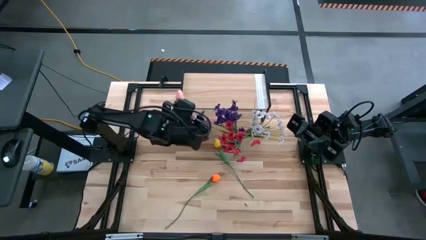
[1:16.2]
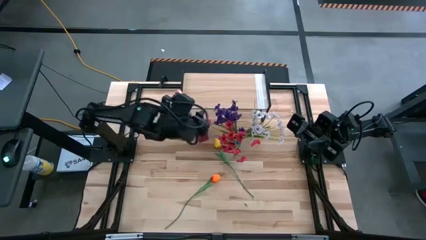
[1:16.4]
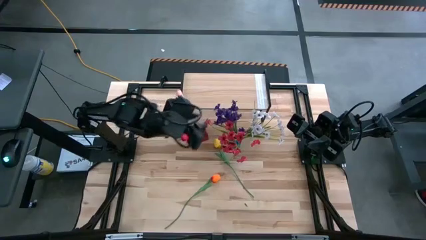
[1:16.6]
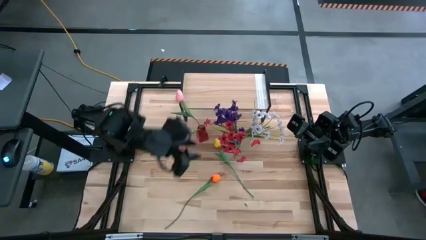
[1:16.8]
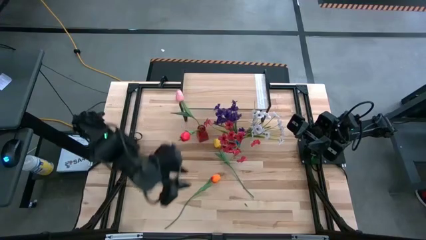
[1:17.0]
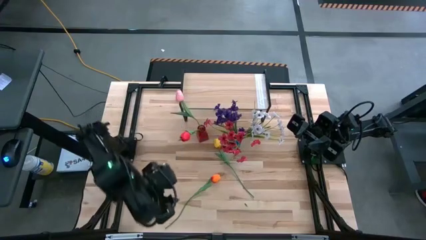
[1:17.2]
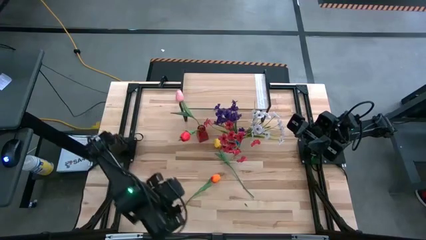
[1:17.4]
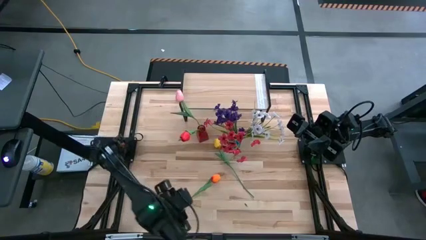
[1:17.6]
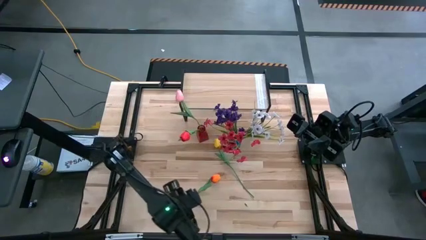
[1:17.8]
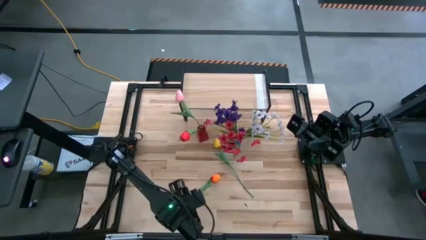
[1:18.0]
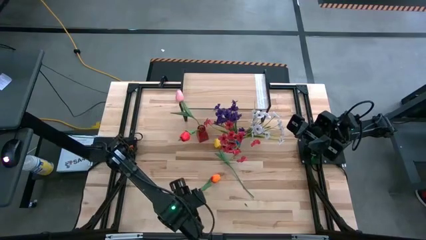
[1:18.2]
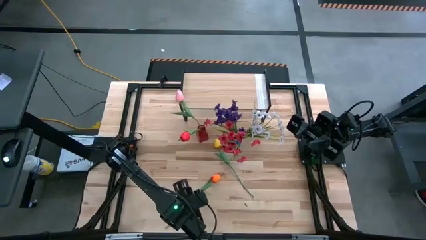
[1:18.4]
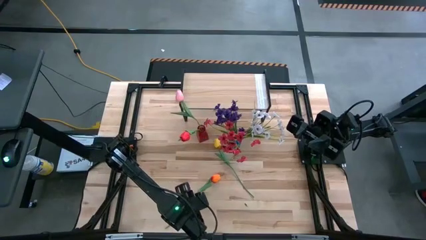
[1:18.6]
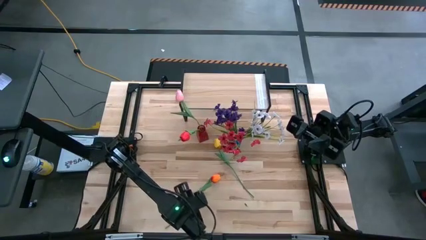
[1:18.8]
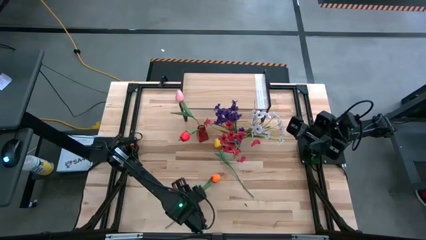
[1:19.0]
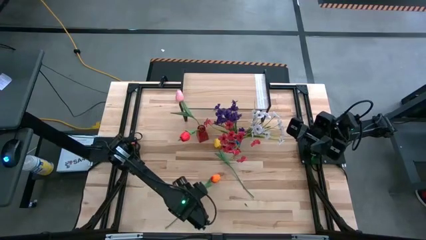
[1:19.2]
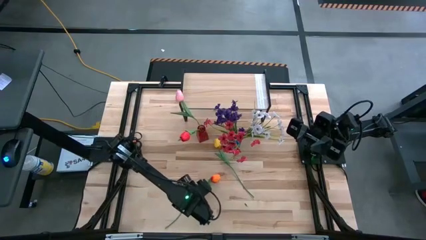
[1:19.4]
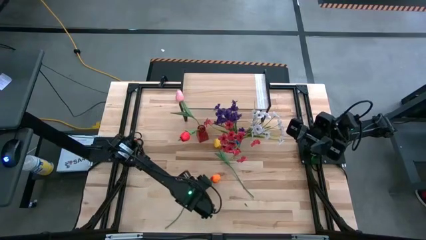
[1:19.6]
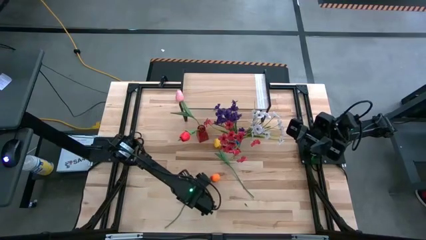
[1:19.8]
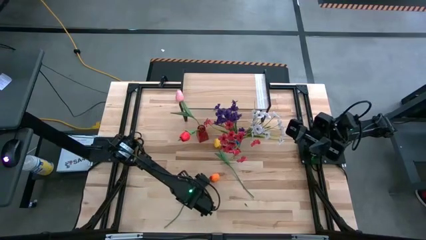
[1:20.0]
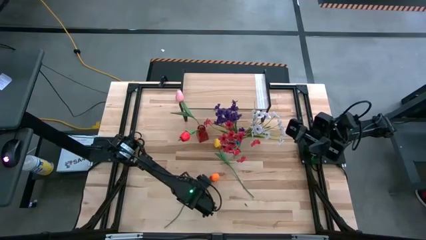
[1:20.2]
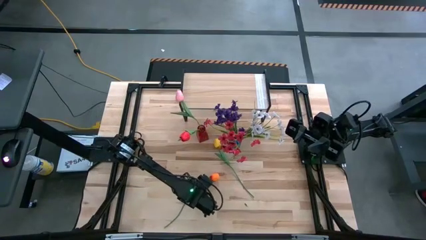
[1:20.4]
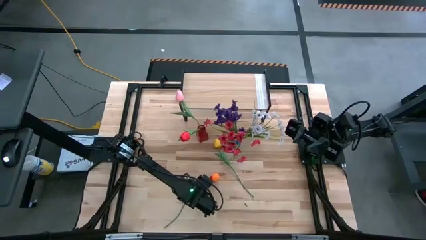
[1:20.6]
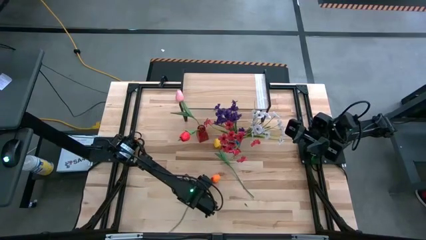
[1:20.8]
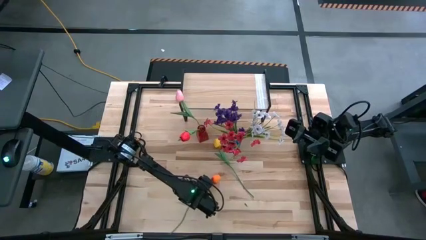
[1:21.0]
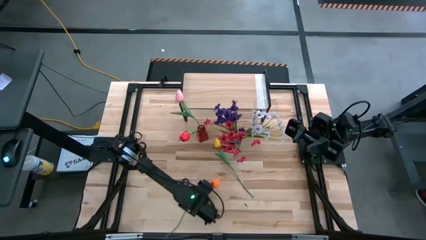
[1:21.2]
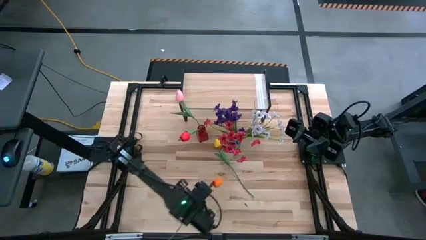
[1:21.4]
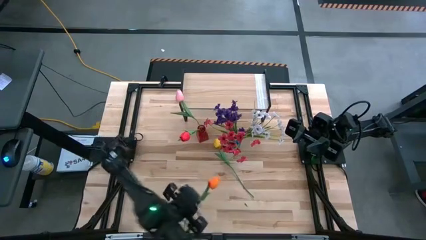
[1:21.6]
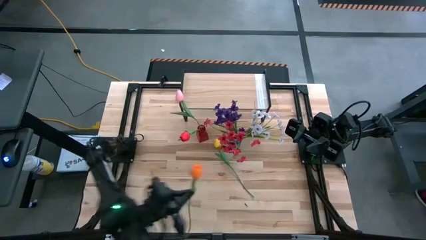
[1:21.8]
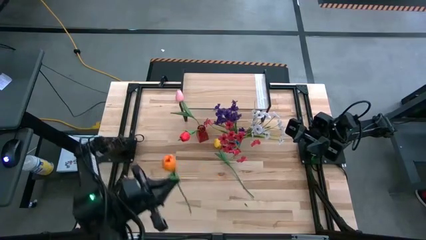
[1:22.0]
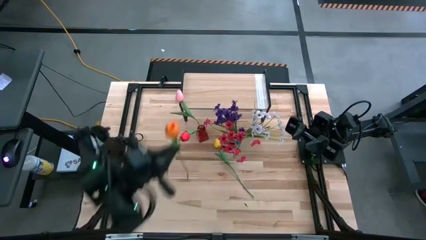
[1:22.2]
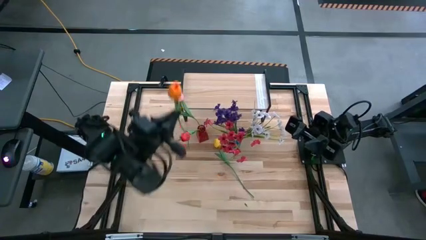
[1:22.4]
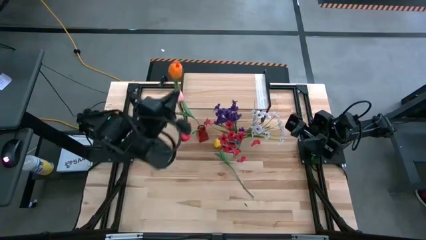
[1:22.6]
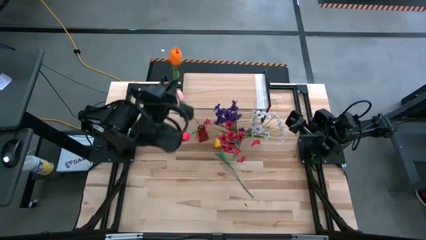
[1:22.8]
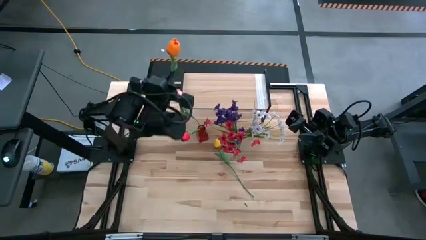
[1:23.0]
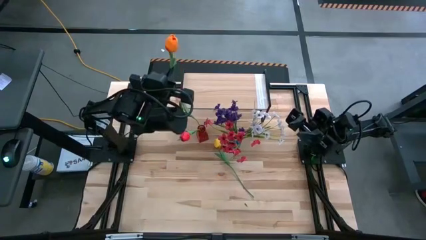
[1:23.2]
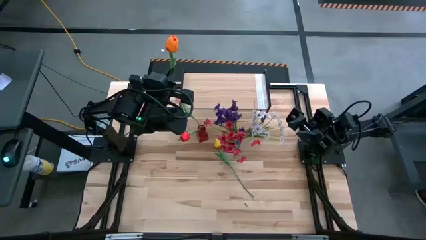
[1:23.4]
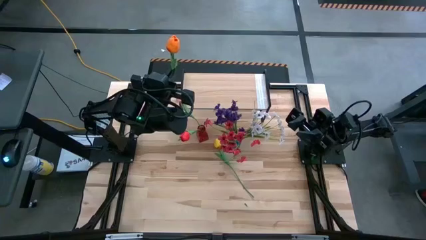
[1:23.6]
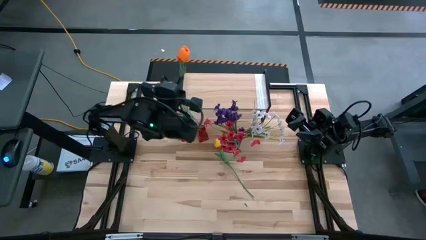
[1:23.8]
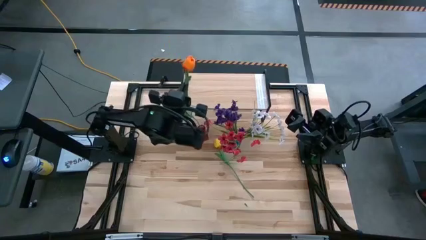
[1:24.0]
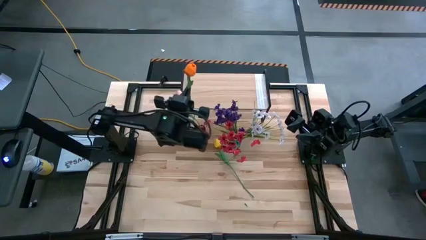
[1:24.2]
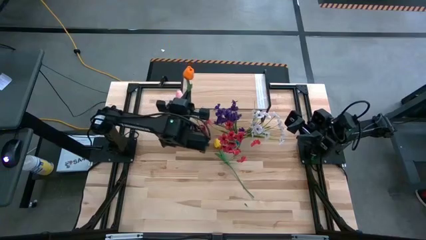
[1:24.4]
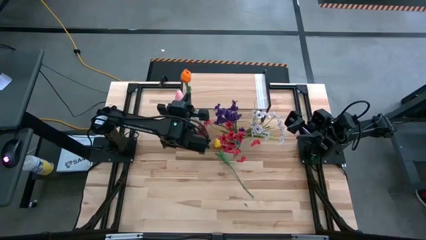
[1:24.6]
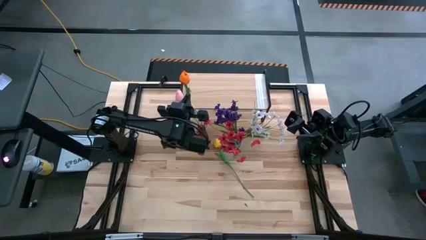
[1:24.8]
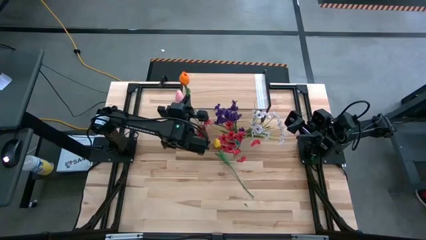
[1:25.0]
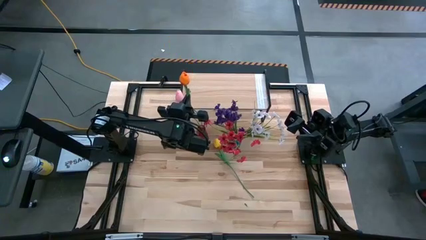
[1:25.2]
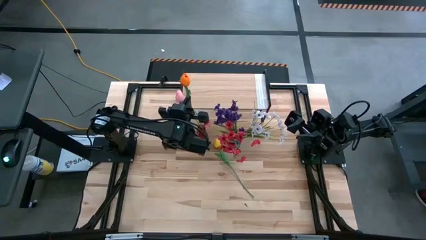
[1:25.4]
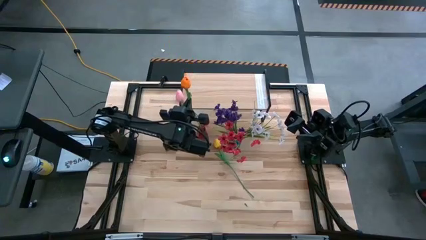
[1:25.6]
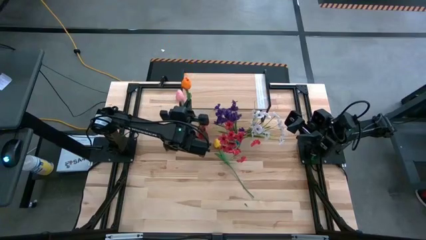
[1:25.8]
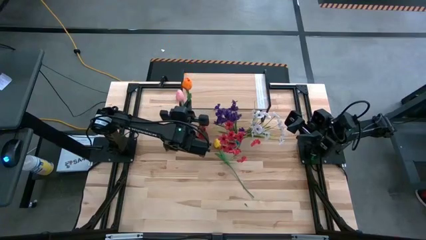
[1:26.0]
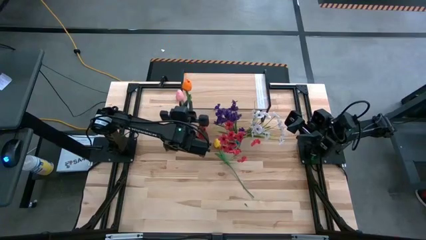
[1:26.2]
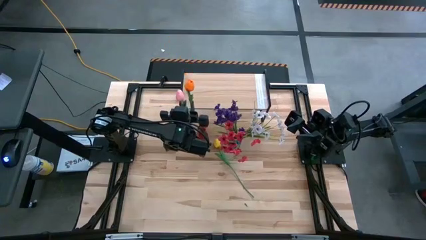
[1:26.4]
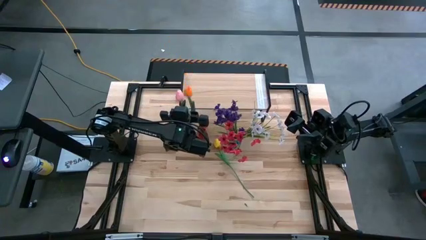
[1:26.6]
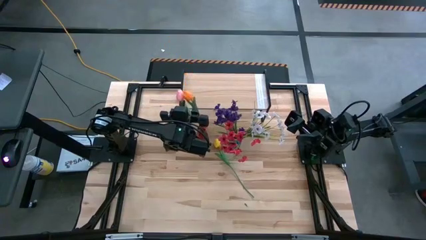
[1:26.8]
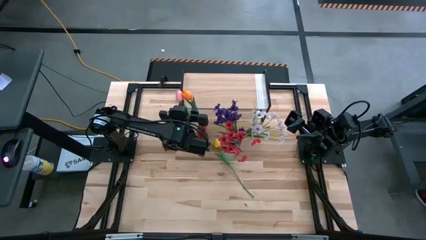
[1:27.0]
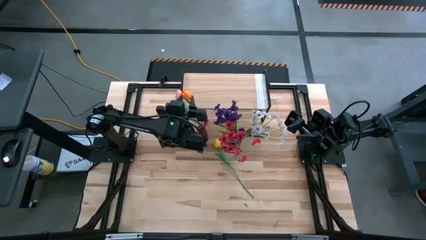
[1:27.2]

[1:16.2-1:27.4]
Task: Pick and place flowers into a vace then onto a shelf
Put the orange flower into the red vase
